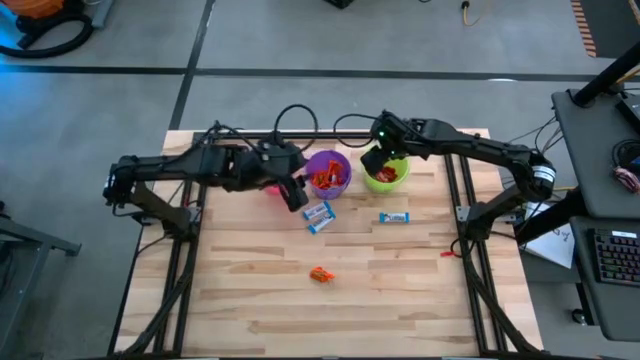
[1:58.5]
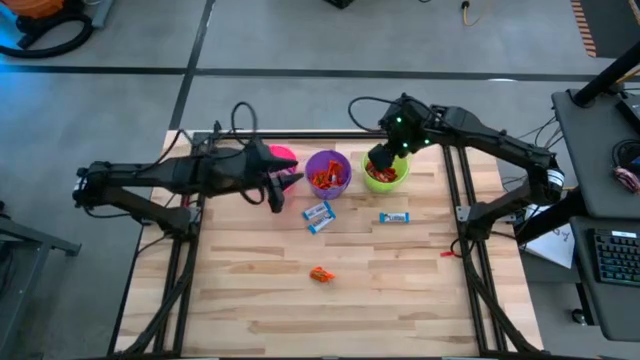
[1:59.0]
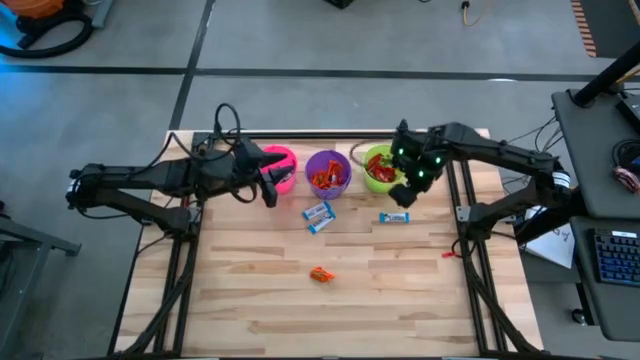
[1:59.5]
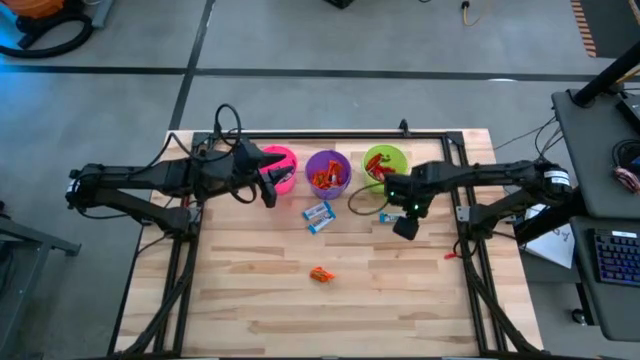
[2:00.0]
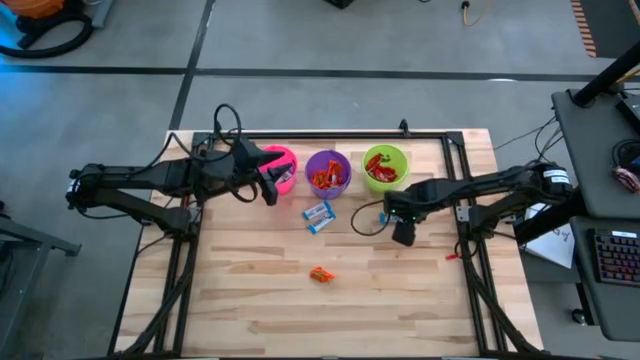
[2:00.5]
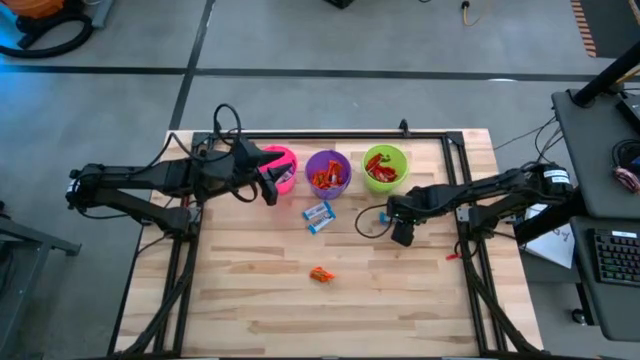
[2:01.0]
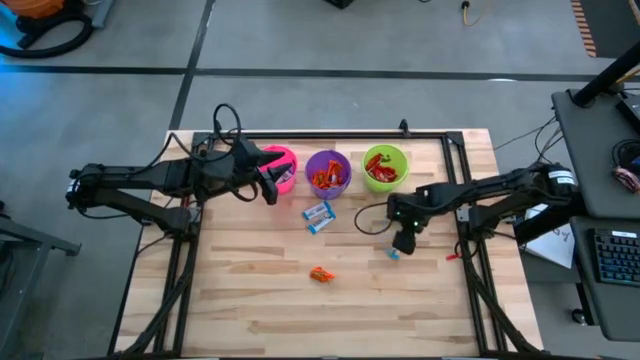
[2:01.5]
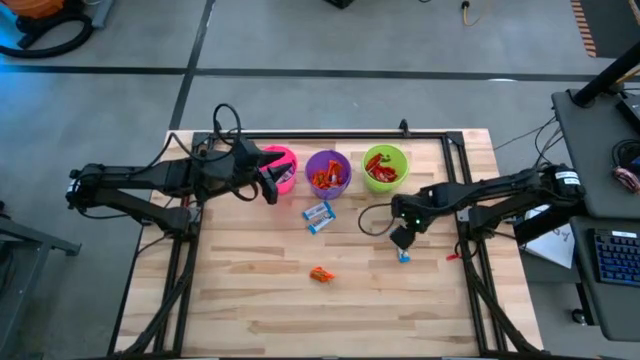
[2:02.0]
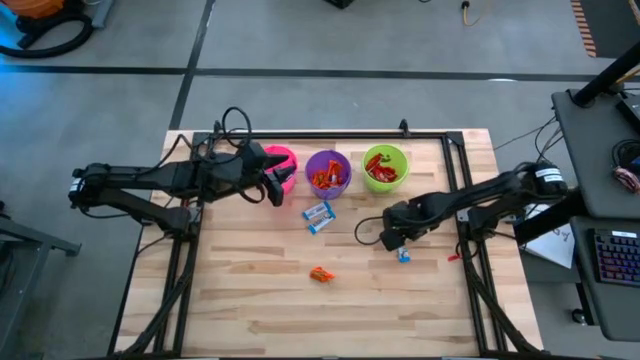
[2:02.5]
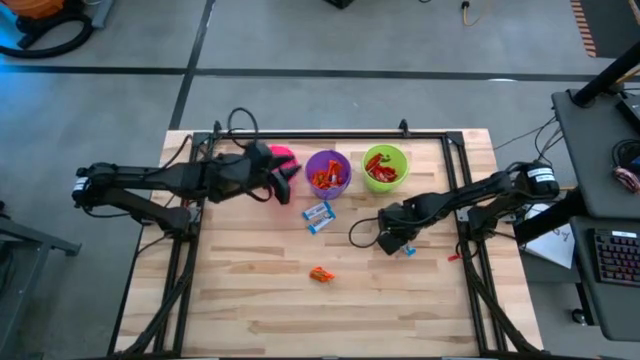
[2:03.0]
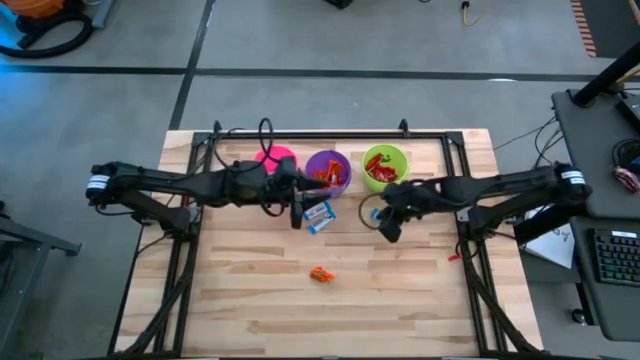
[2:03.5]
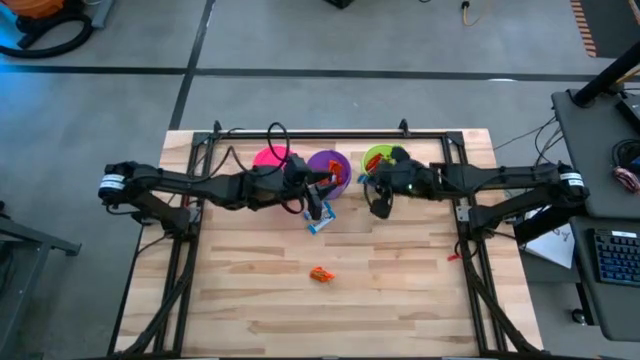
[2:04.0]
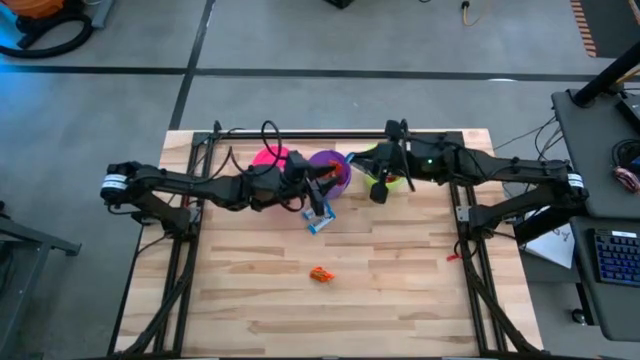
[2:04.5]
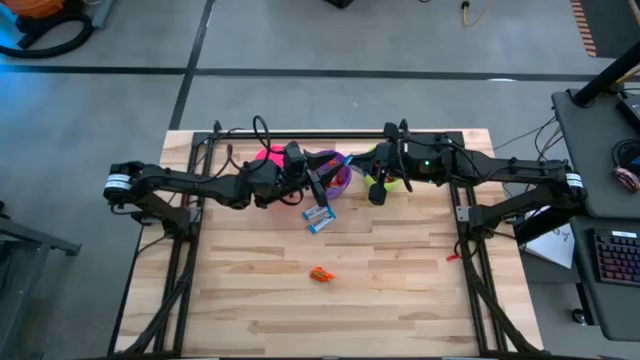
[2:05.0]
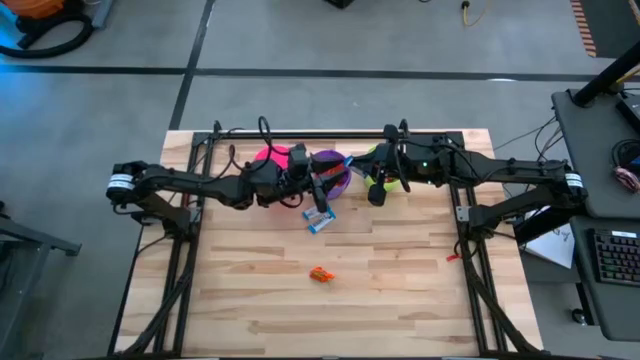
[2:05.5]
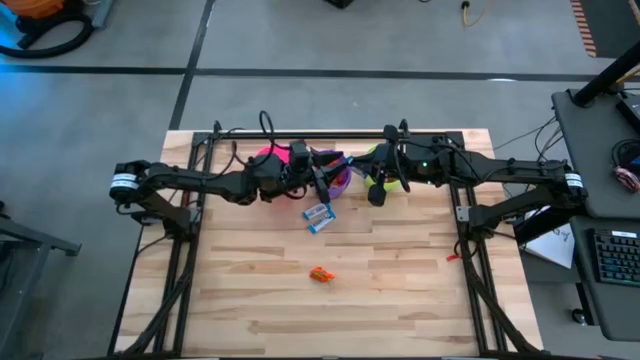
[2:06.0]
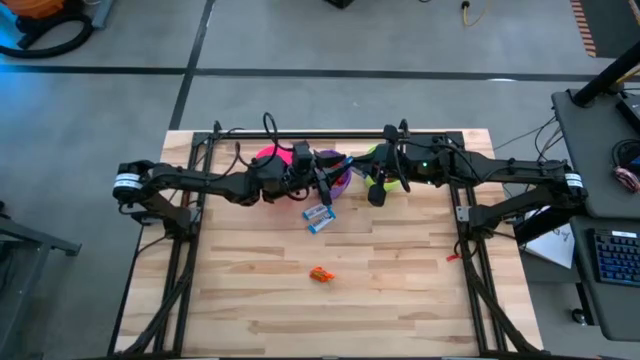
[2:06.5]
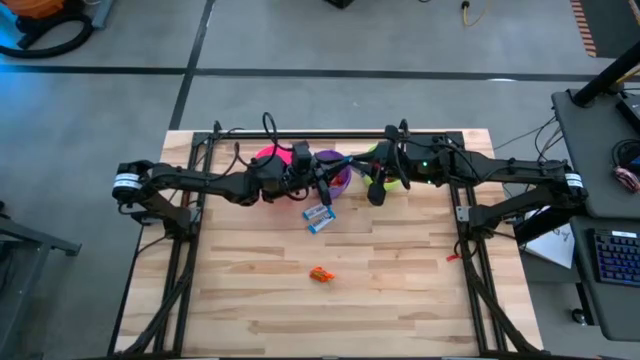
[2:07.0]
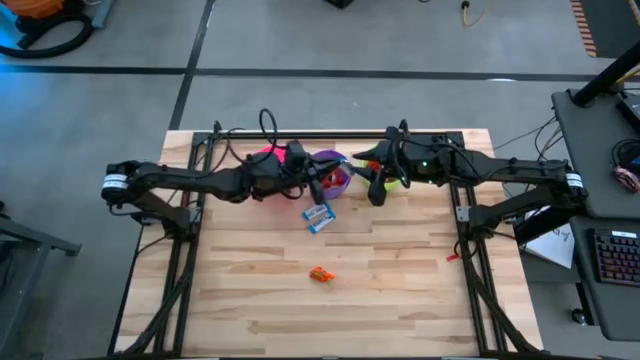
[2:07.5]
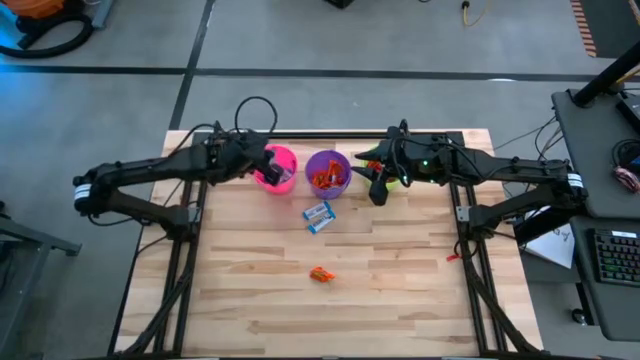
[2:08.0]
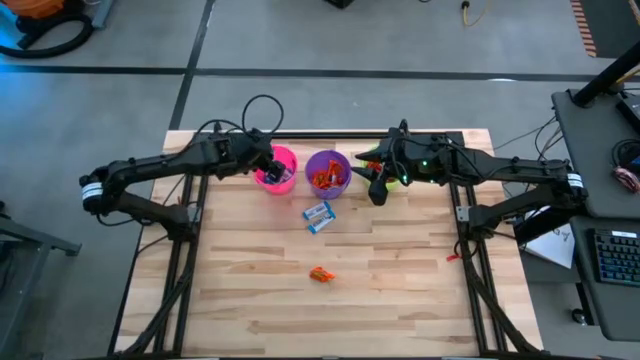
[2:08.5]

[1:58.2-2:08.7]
Task: Organize candy in baskets
Put the white chocolate into the pink bucket

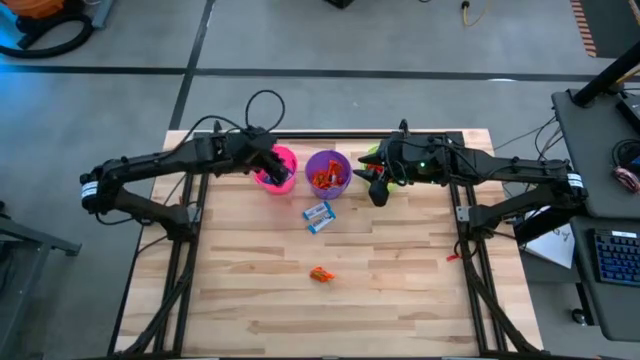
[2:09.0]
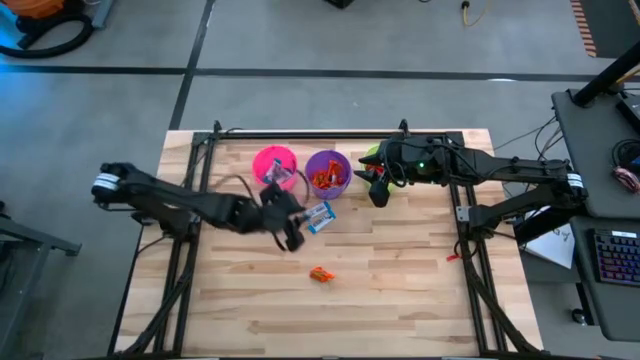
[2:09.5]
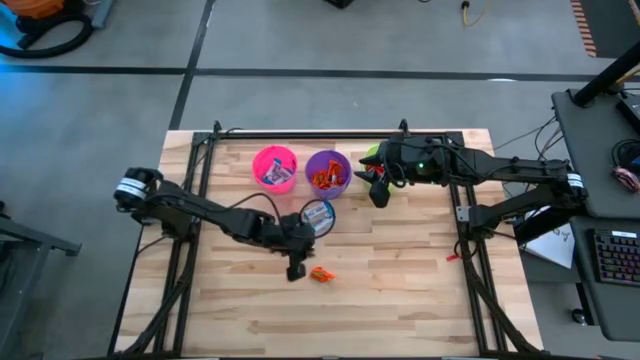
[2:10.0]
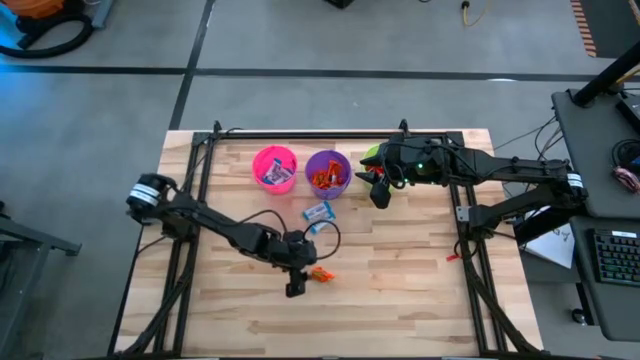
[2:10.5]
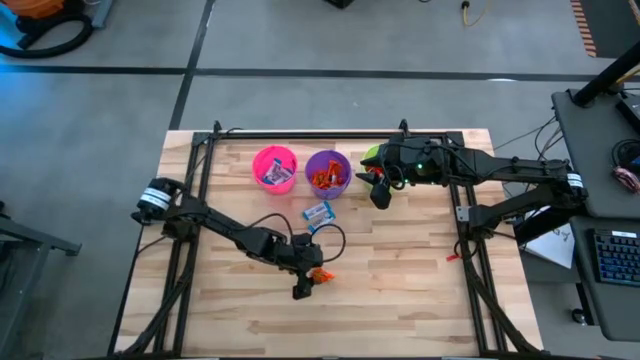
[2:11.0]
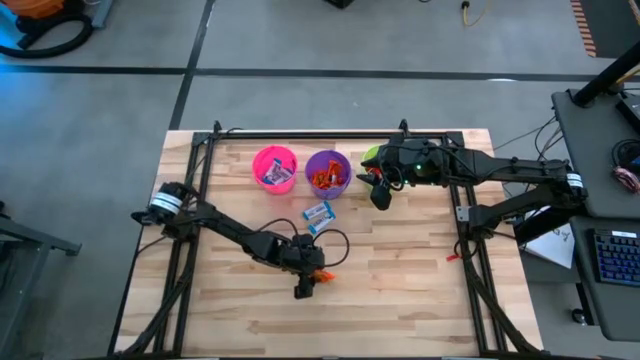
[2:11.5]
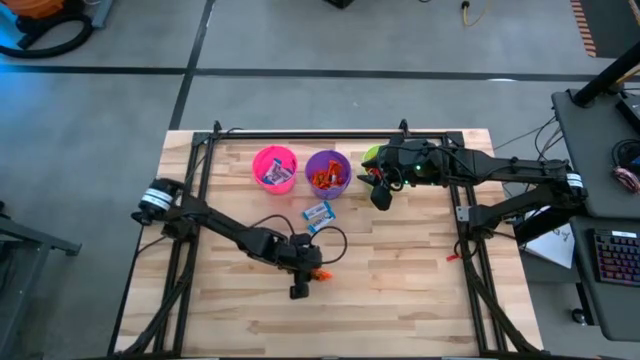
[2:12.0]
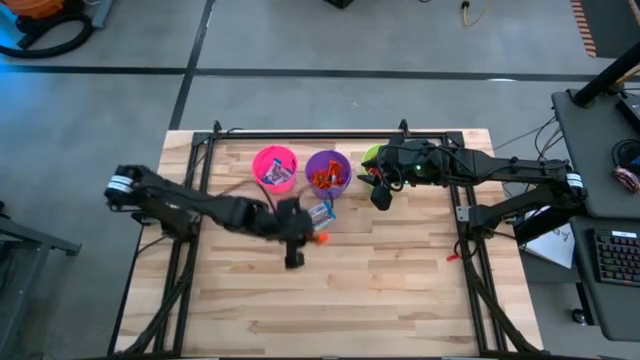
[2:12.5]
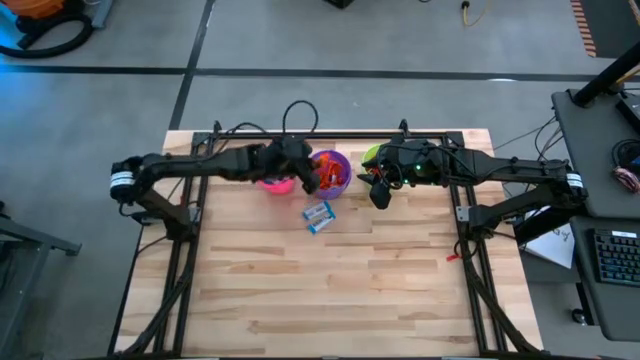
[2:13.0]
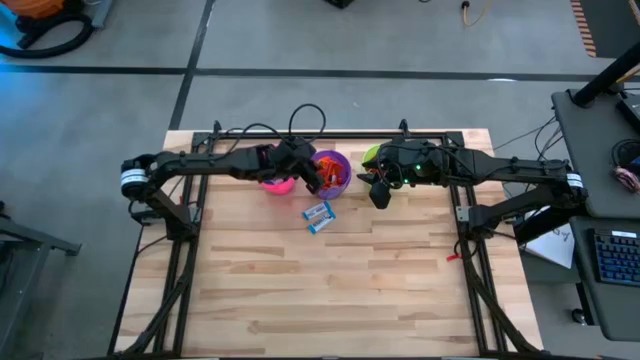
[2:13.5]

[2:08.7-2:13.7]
Put the orange chocolate into the violet bucket

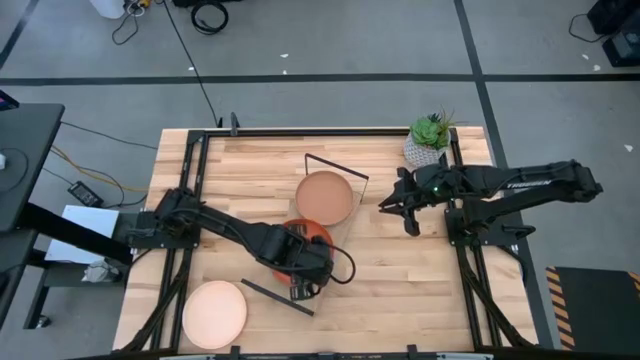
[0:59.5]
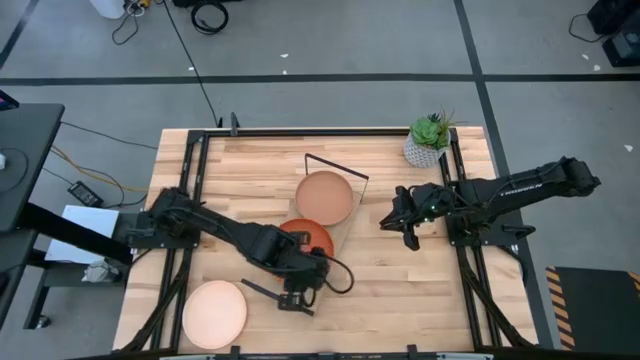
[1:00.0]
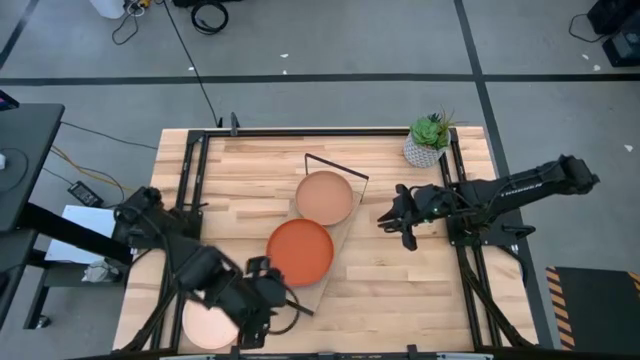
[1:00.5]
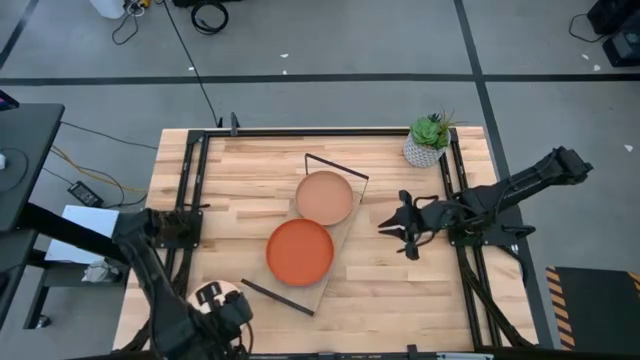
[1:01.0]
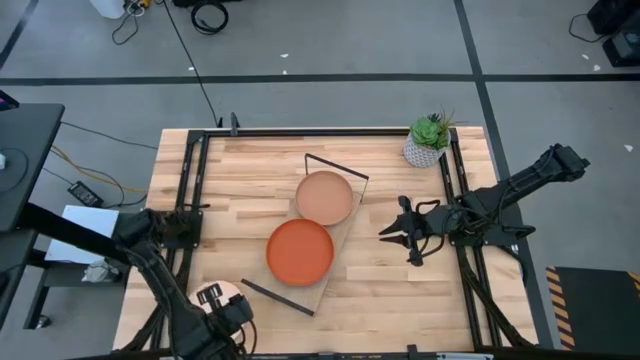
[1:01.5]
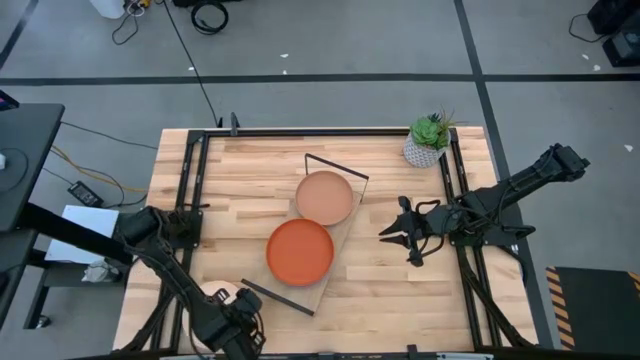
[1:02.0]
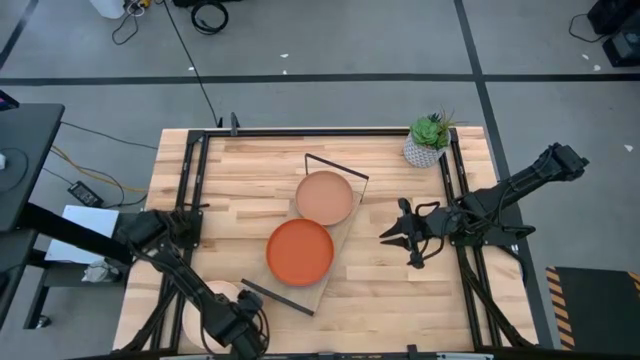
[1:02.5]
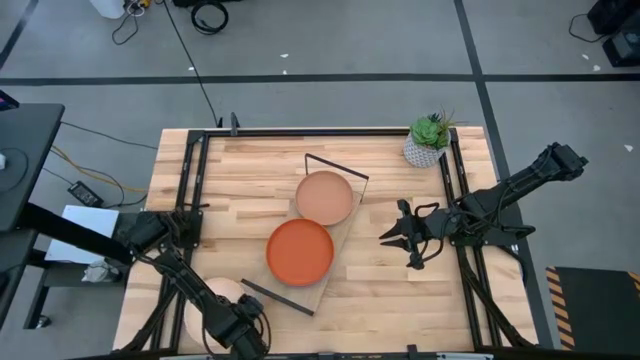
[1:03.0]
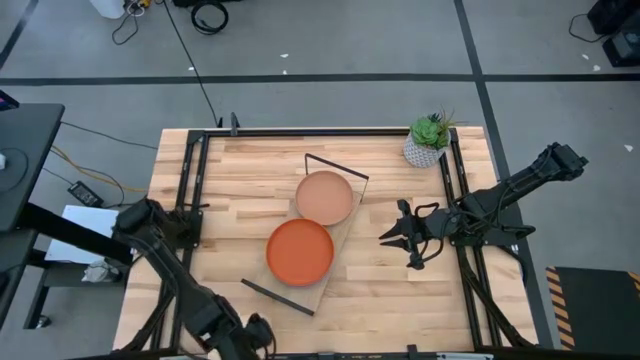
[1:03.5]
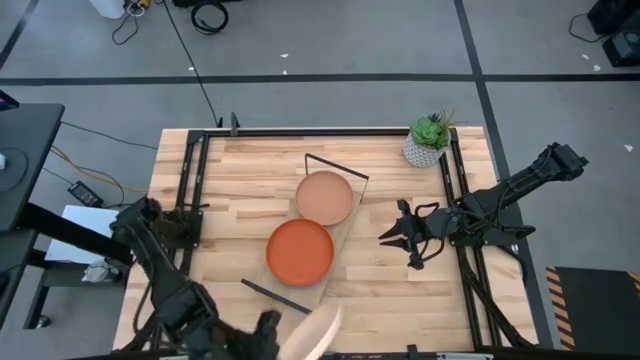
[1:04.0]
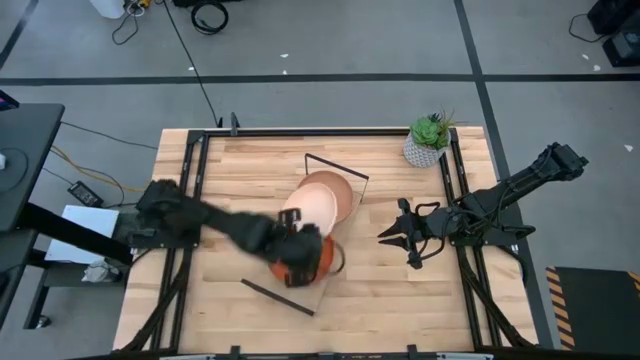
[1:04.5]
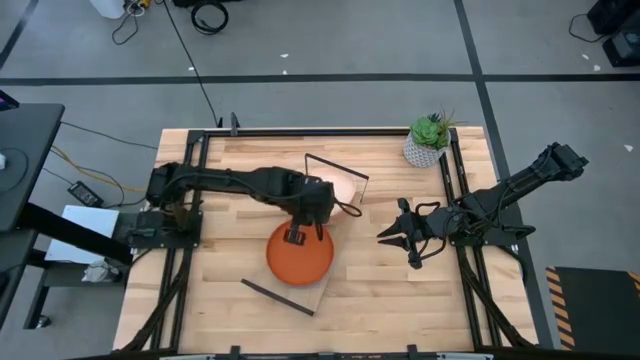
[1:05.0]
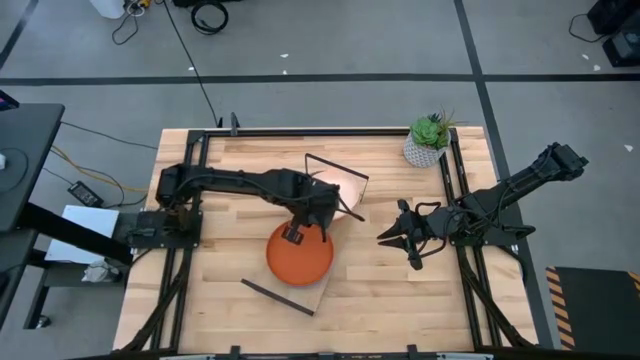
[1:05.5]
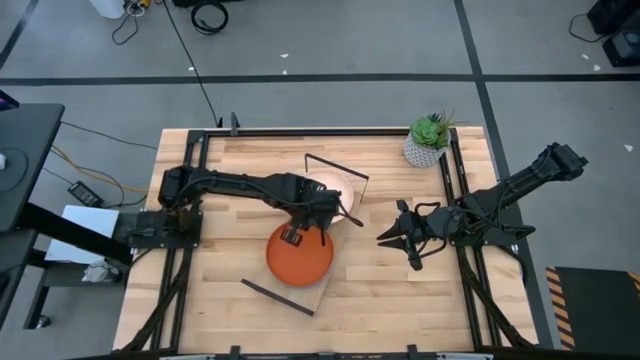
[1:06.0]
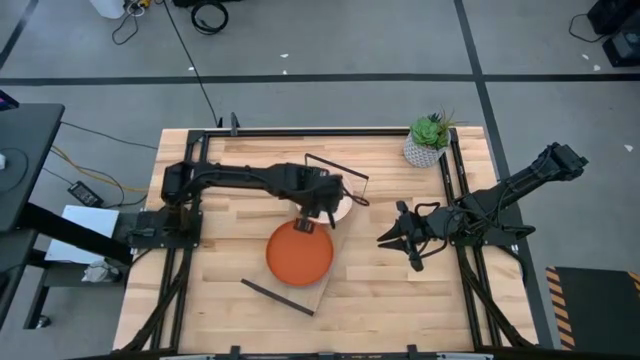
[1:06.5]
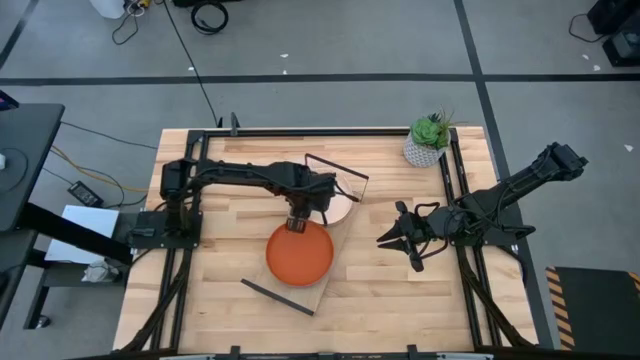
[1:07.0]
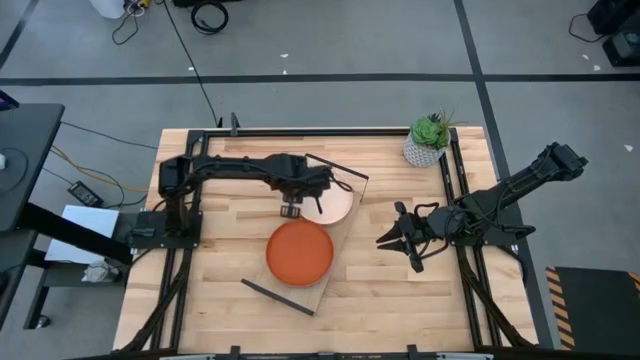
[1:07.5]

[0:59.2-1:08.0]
Task: Place and stack plates onto a shelf
Stack the light pink plate on top of the brown plate
